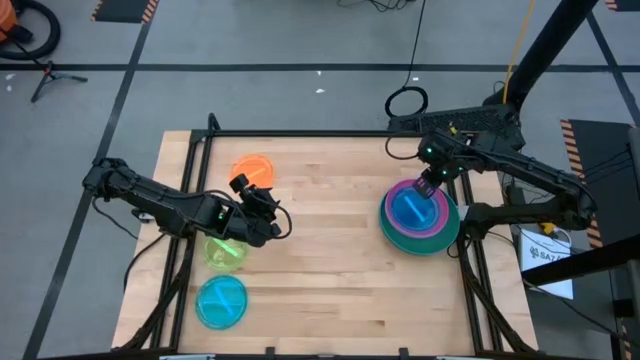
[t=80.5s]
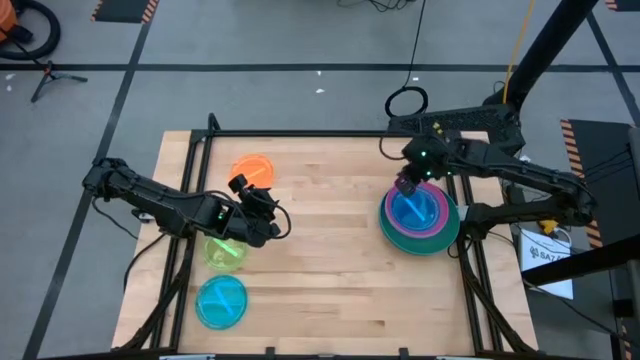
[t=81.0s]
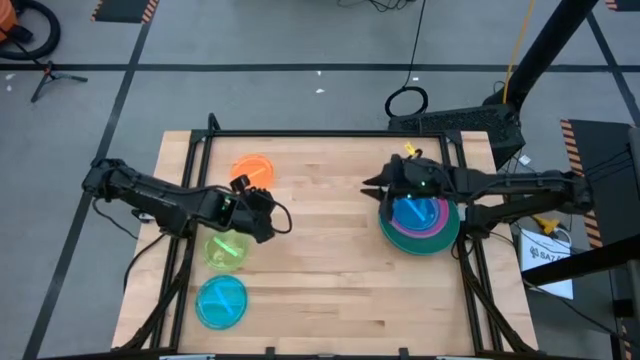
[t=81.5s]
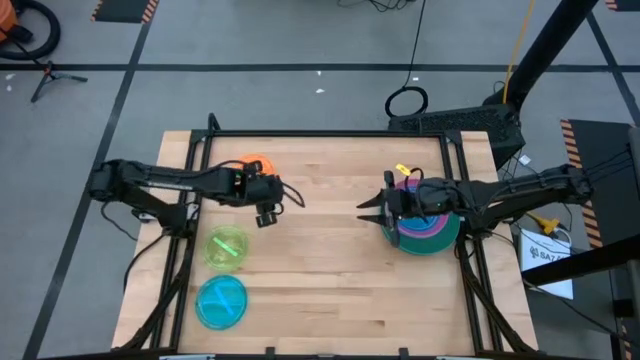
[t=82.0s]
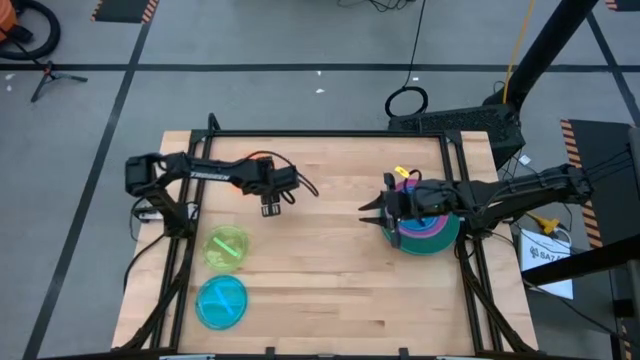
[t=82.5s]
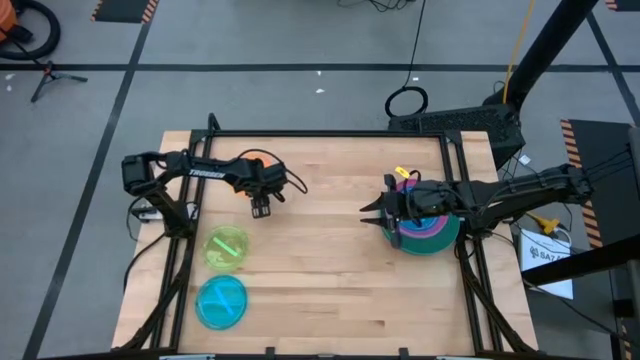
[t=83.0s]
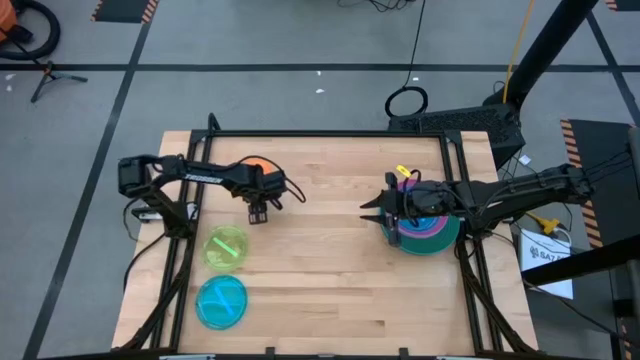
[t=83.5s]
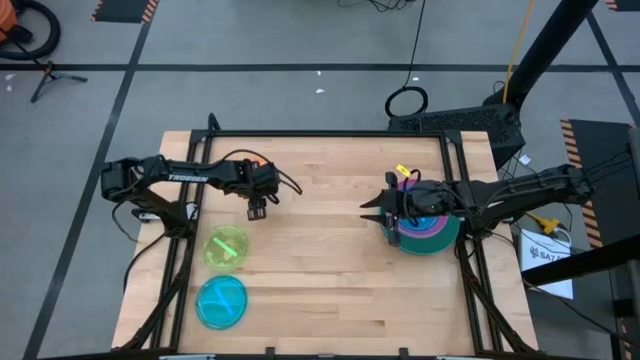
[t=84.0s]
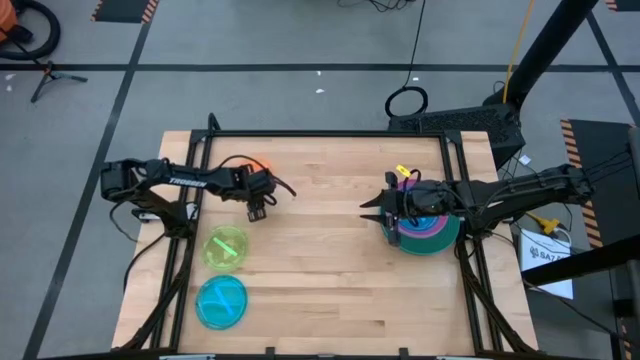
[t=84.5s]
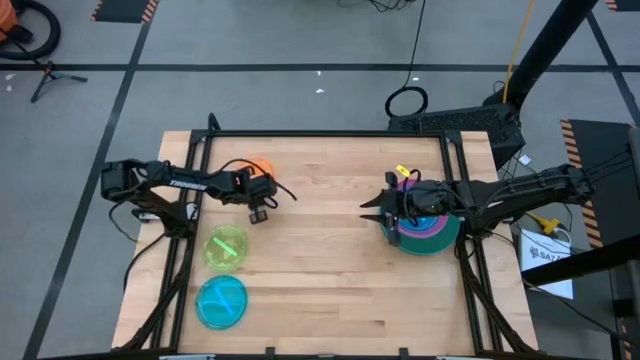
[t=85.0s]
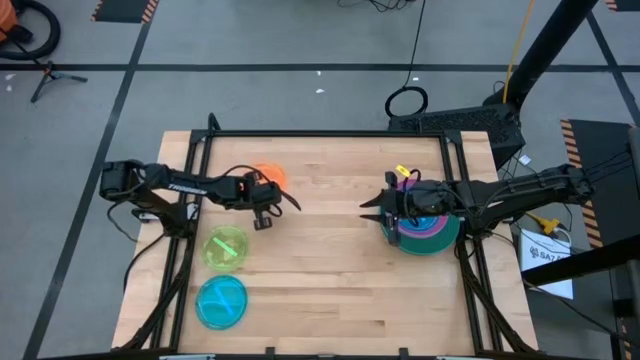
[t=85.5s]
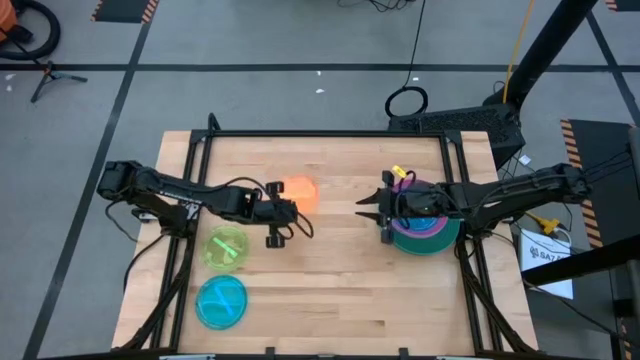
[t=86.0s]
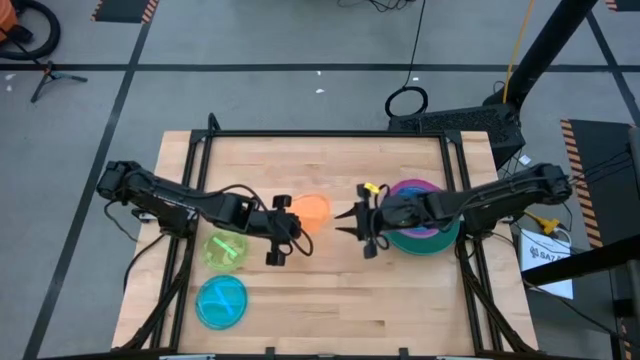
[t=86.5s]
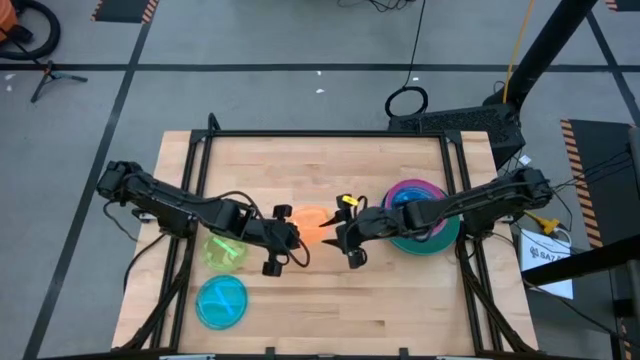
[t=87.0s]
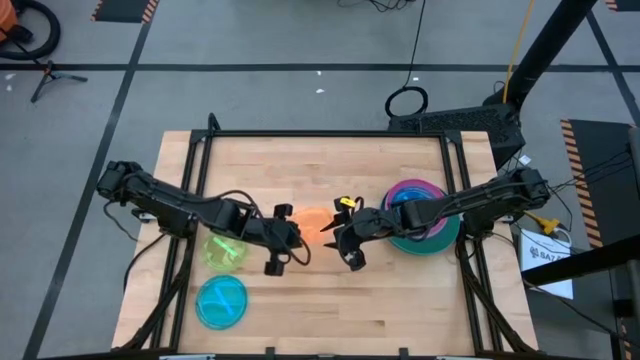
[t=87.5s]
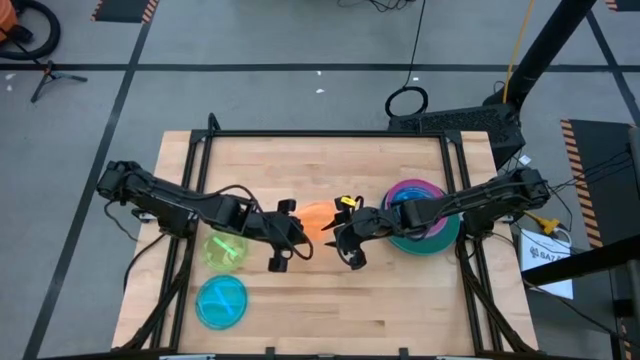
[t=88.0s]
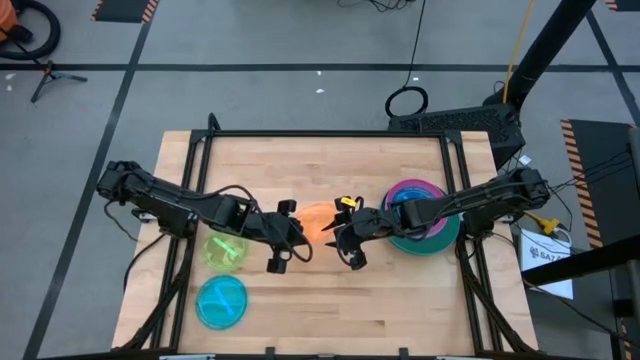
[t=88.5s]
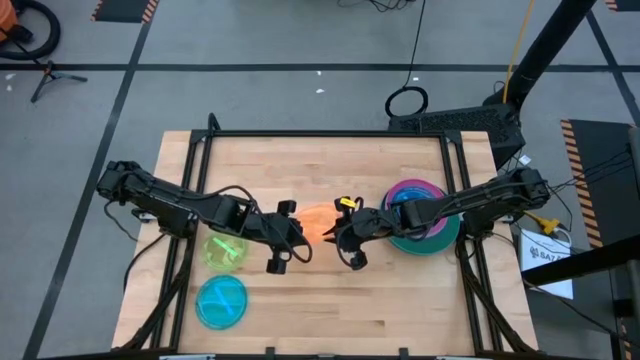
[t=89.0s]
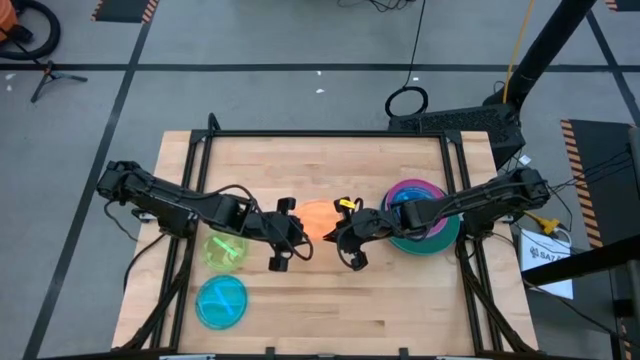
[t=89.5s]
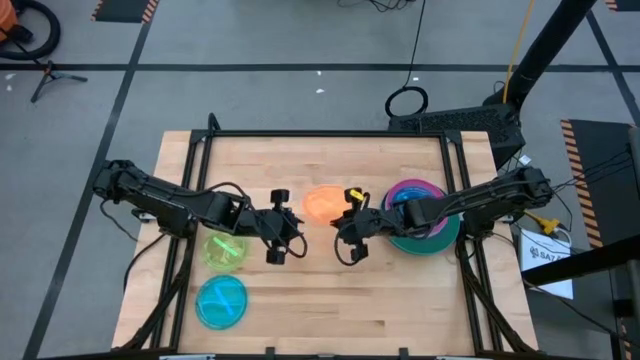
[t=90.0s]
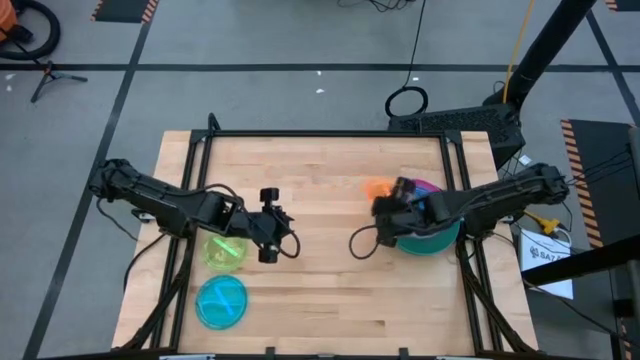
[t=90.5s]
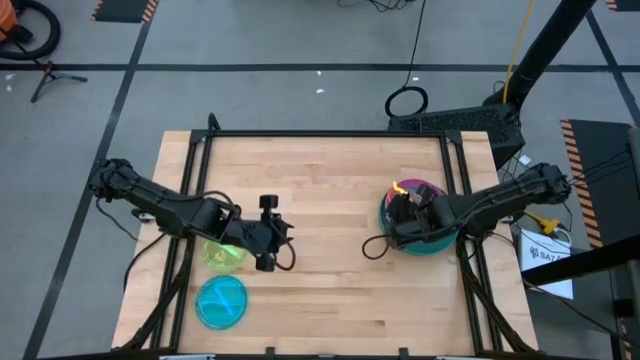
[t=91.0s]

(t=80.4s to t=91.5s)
Task: Stack plastic plates
Stack the orange plate on top of the light blue plate

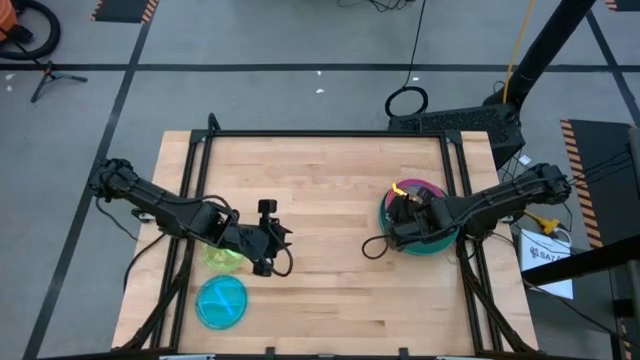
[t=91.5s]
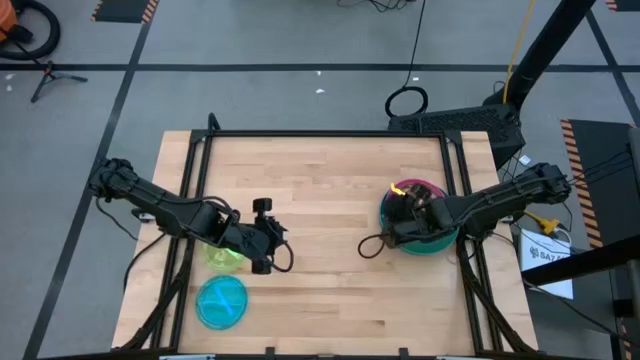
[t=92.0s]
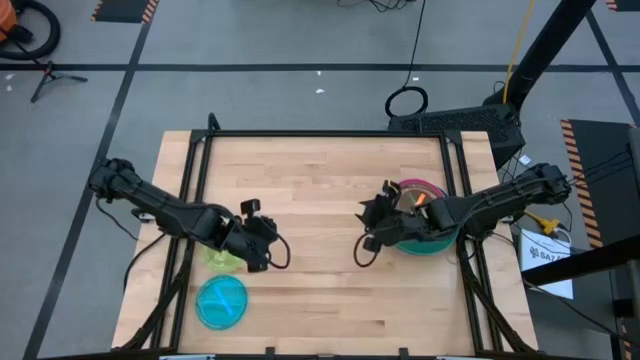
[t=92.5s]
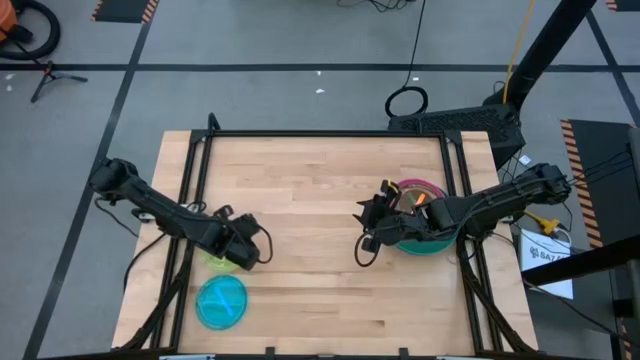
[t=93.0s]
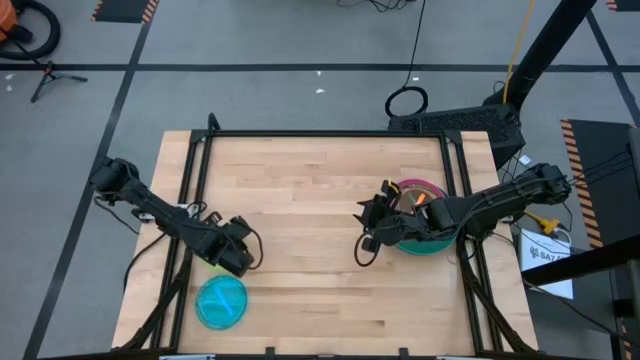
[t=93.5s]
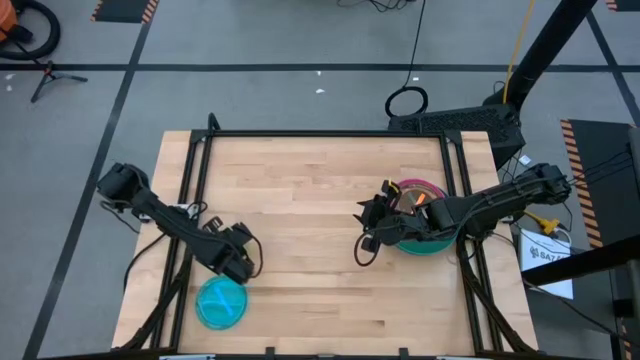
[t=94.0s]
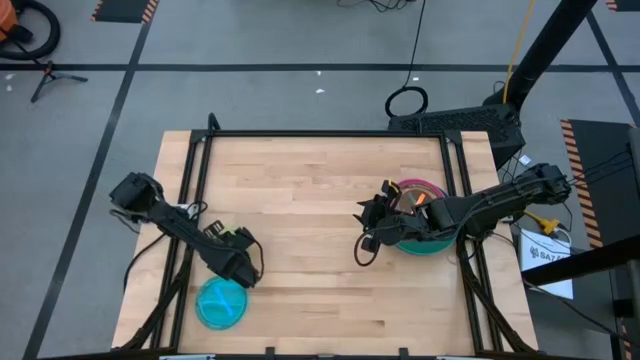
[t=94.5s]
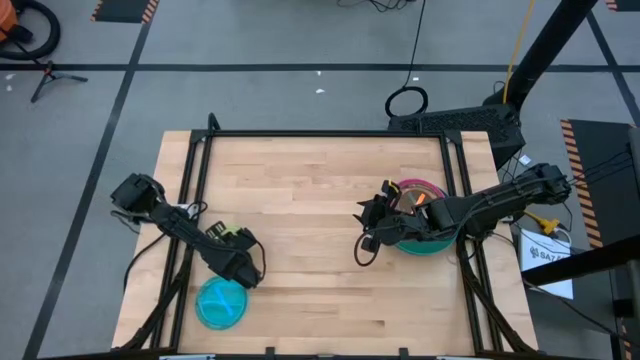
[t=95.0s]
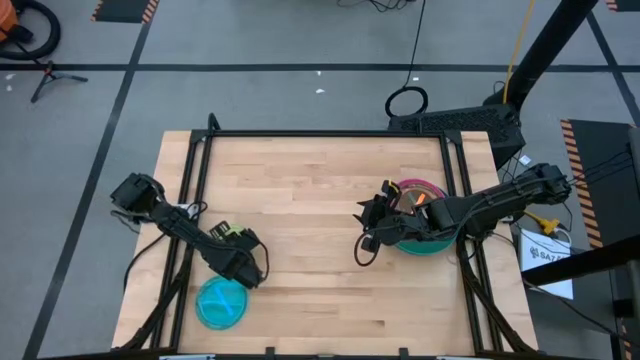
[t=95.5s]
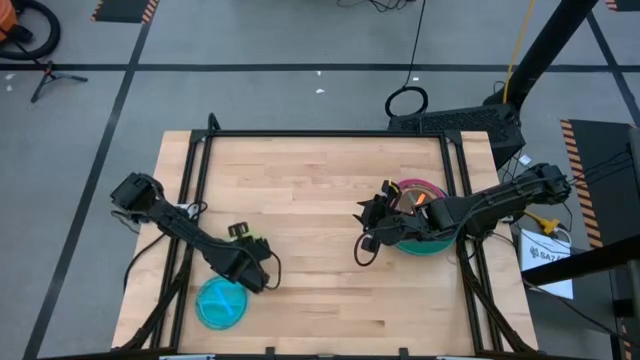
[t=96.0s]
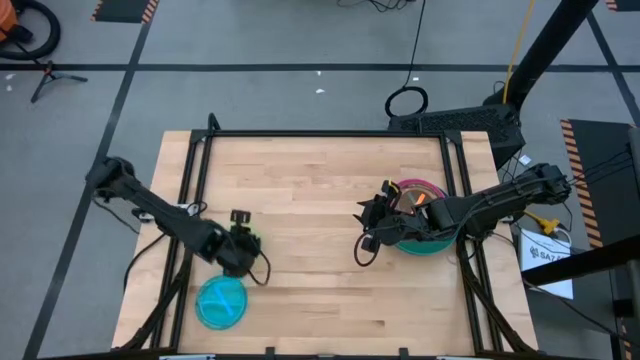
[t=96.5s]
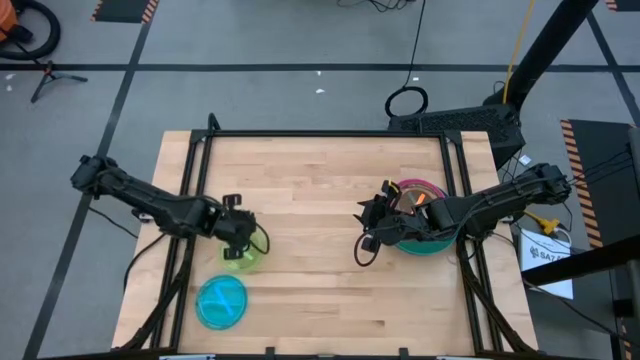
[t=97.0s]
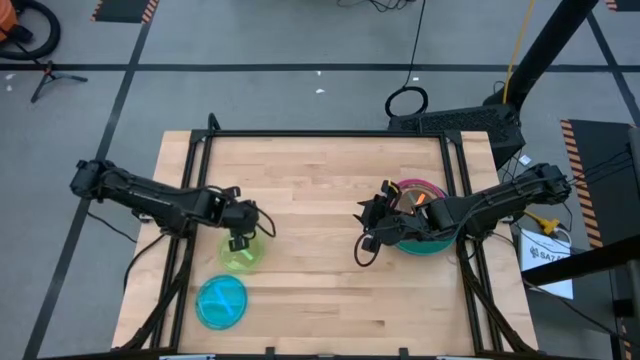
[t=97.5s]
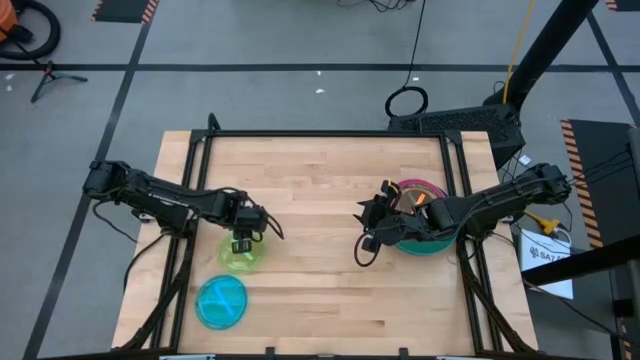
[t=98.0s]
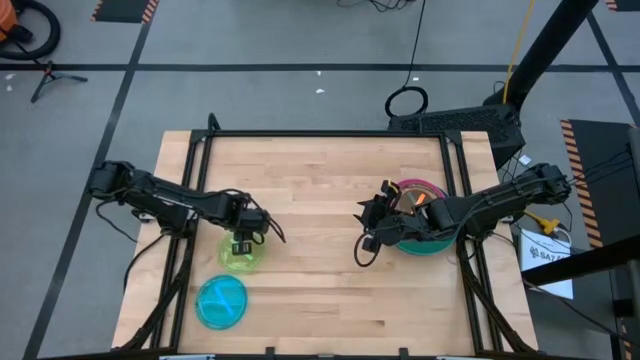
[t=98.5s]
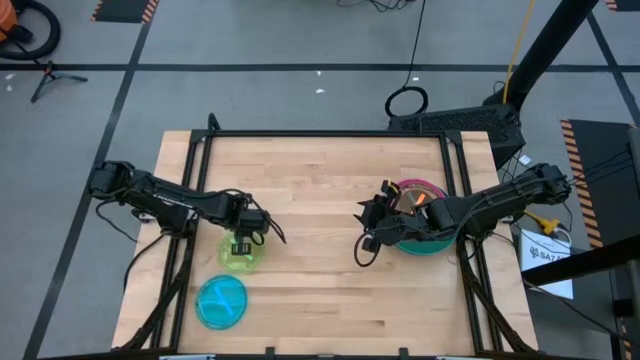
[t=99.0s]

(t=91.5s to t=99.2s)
Stack the light green plate on top of the orange plate

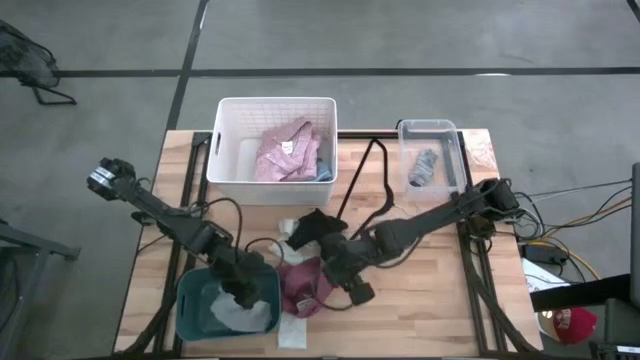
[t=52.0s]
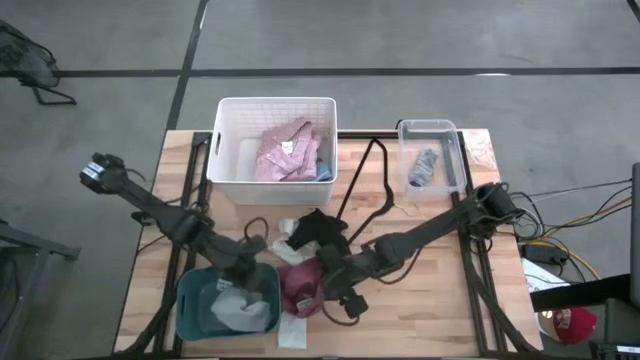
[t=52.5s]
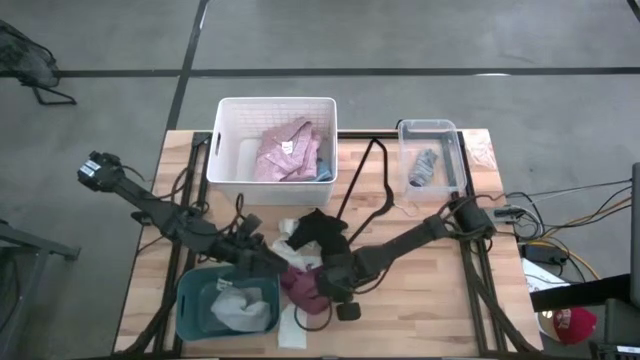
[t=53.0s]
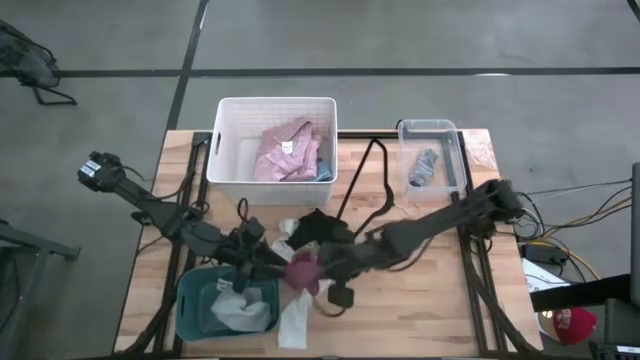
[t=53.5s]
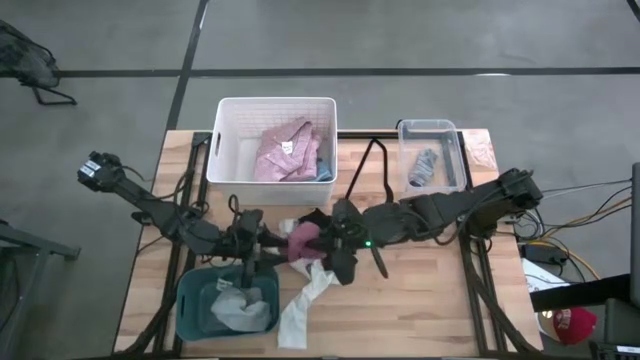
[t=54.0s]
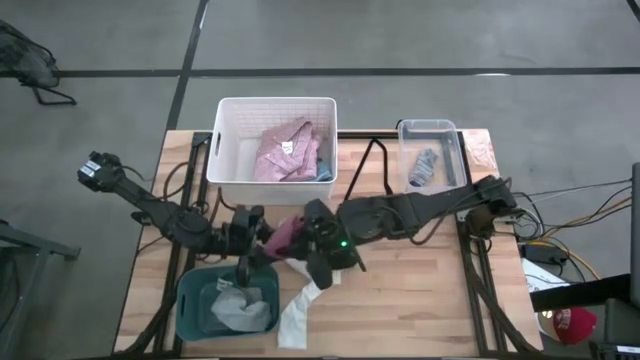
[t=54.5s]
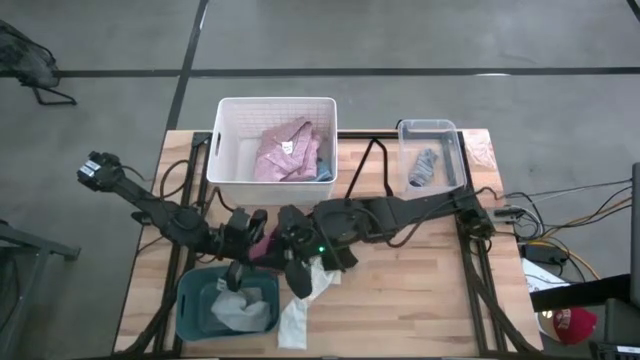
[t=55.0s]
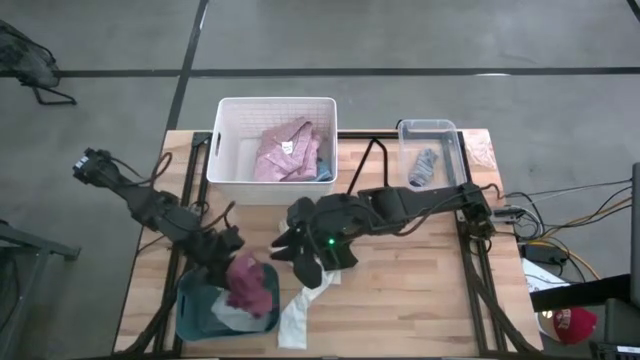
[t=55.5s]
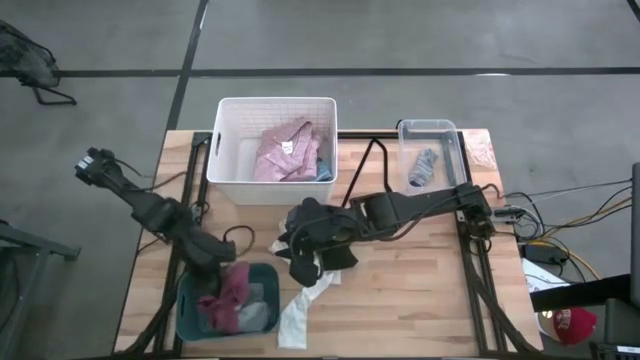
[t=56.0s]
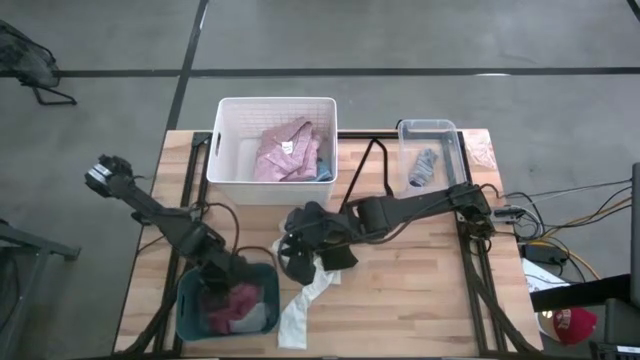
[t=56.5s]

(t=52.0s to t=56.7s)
Task: Pick & Place Cloths
Put the pink boxer into the blue bin
